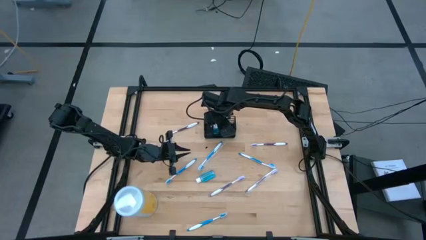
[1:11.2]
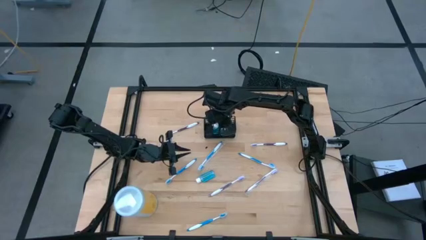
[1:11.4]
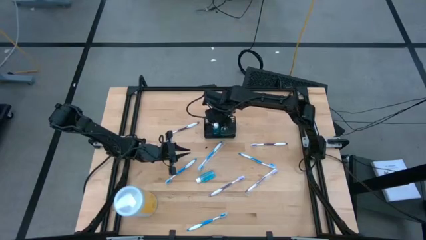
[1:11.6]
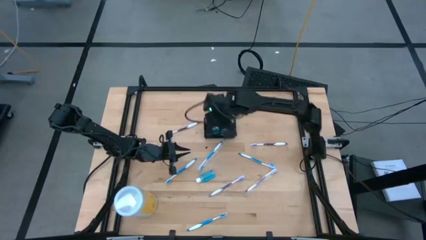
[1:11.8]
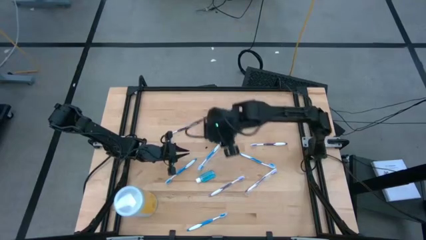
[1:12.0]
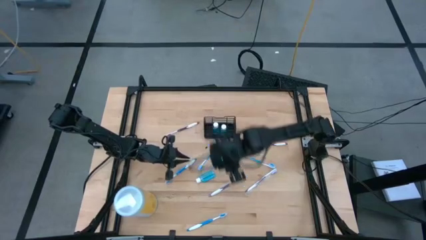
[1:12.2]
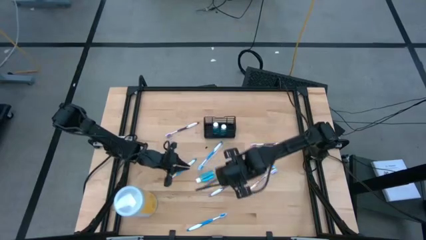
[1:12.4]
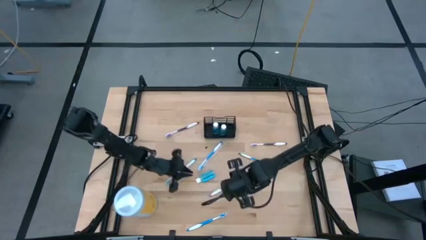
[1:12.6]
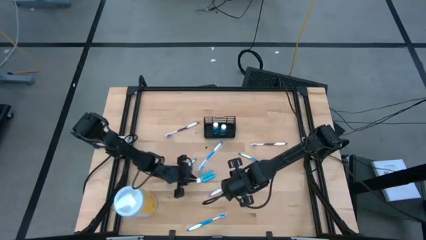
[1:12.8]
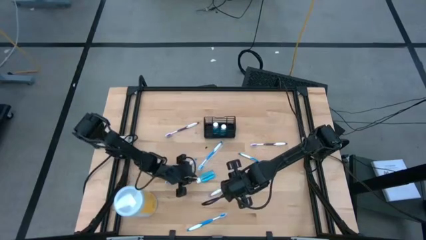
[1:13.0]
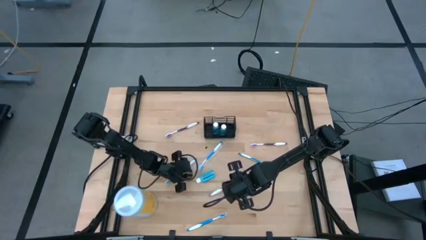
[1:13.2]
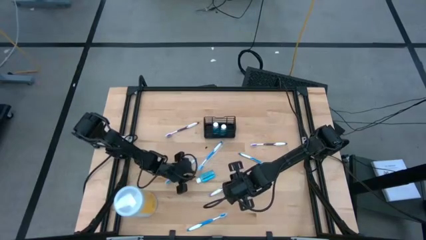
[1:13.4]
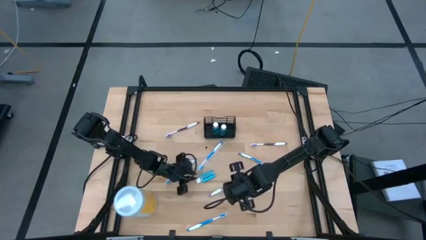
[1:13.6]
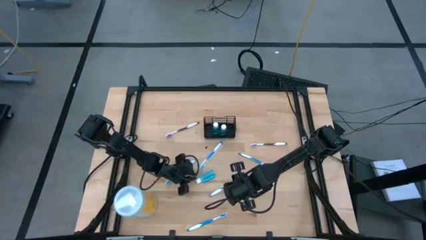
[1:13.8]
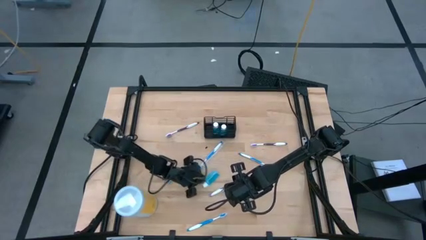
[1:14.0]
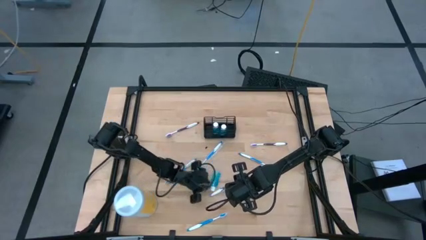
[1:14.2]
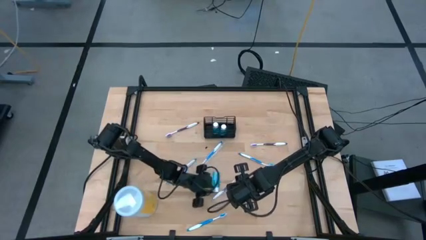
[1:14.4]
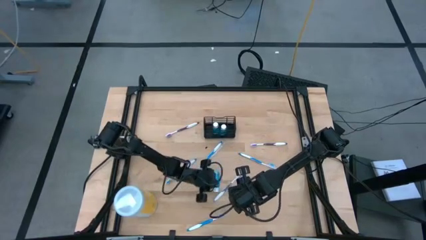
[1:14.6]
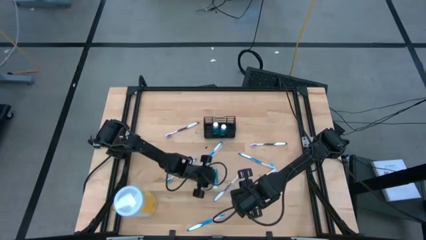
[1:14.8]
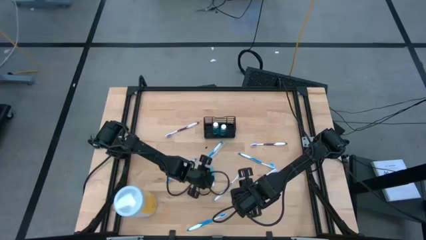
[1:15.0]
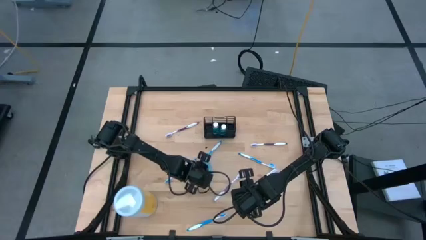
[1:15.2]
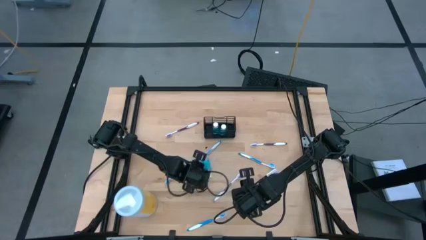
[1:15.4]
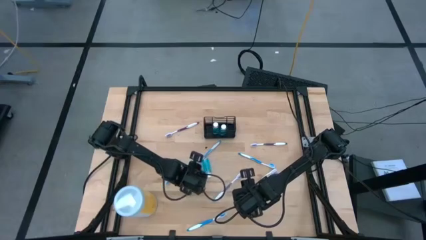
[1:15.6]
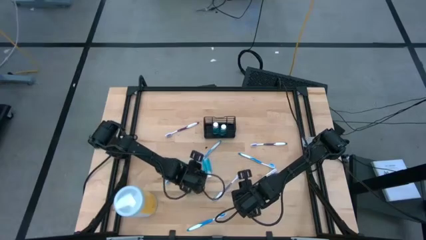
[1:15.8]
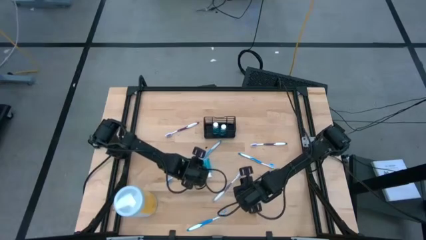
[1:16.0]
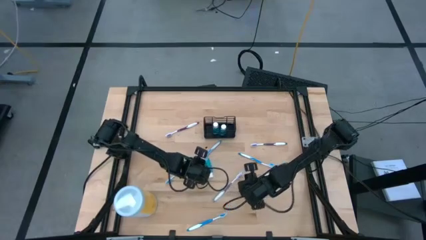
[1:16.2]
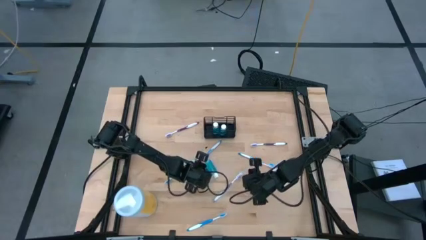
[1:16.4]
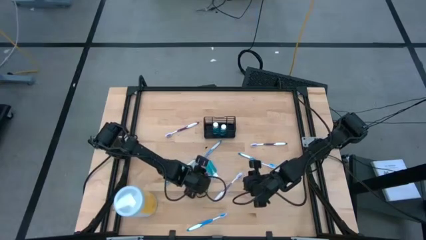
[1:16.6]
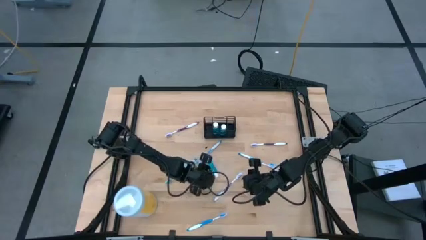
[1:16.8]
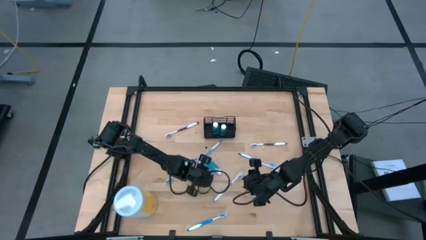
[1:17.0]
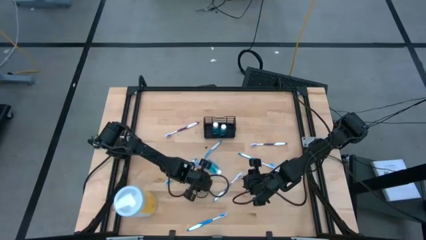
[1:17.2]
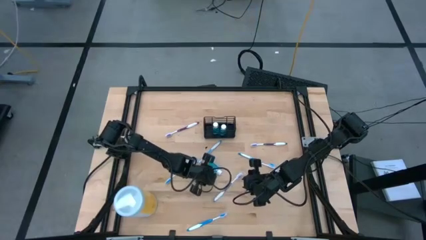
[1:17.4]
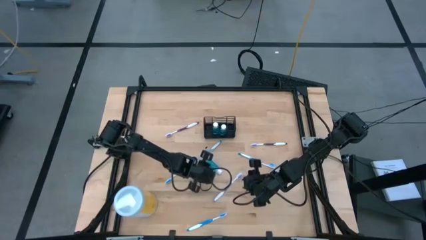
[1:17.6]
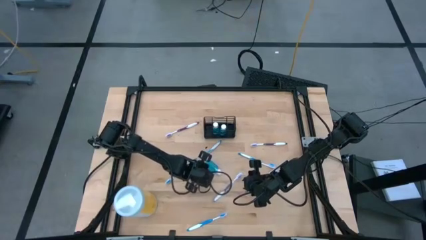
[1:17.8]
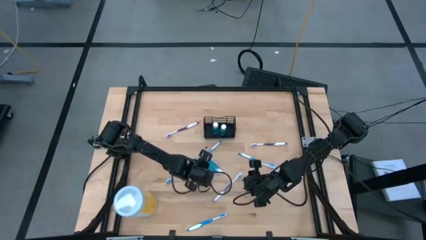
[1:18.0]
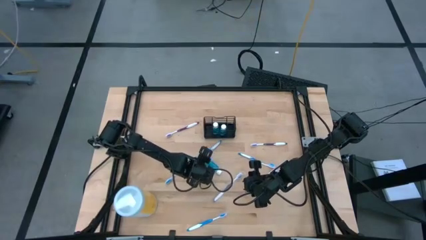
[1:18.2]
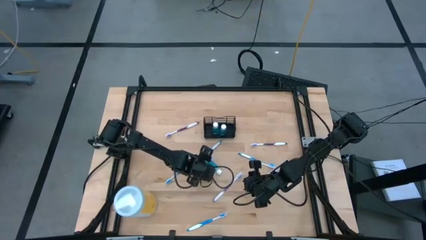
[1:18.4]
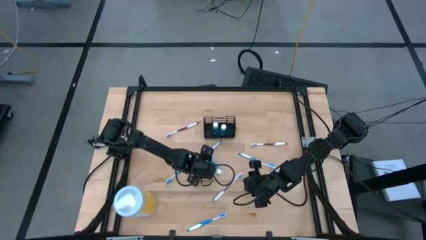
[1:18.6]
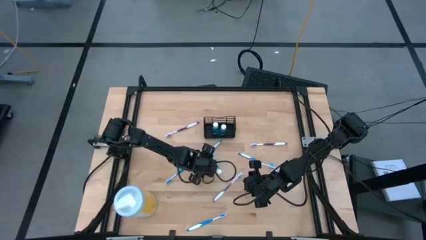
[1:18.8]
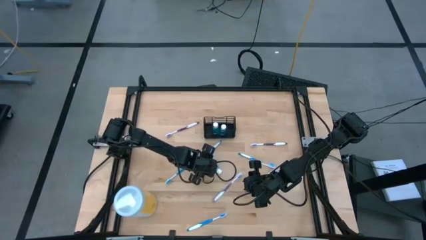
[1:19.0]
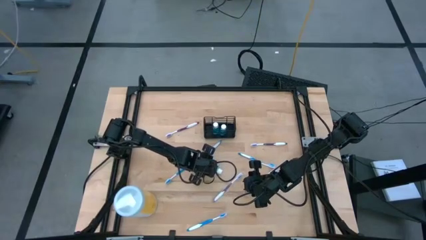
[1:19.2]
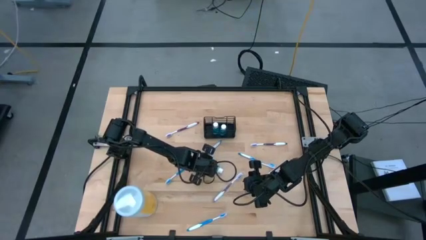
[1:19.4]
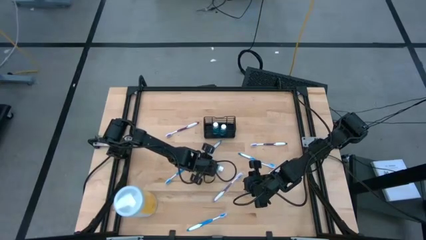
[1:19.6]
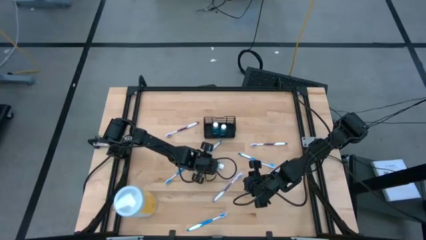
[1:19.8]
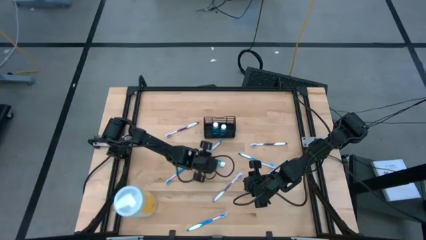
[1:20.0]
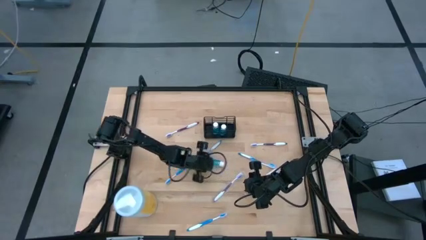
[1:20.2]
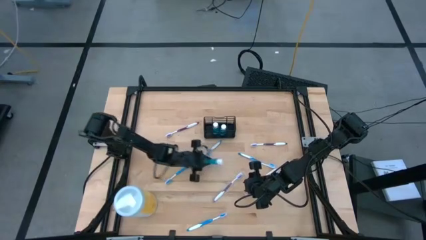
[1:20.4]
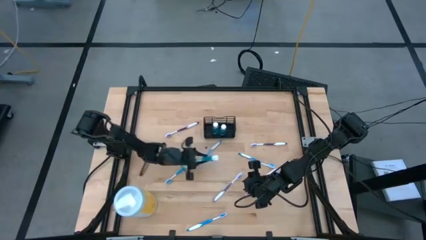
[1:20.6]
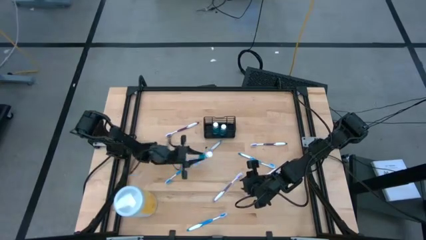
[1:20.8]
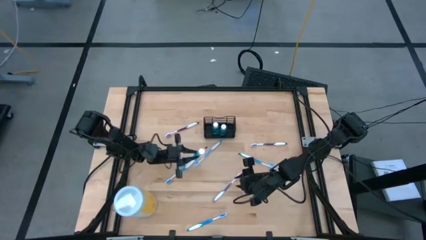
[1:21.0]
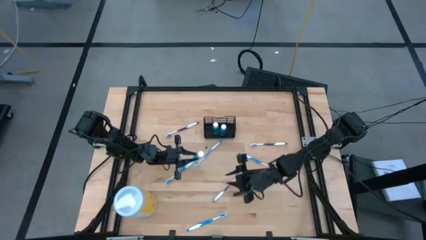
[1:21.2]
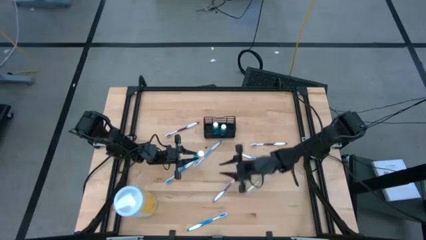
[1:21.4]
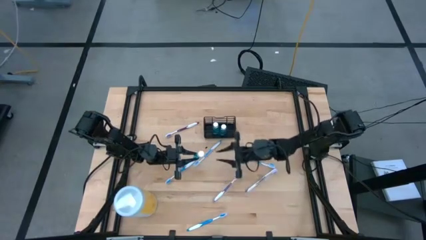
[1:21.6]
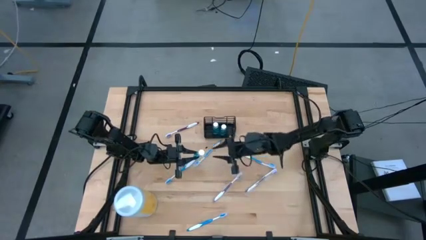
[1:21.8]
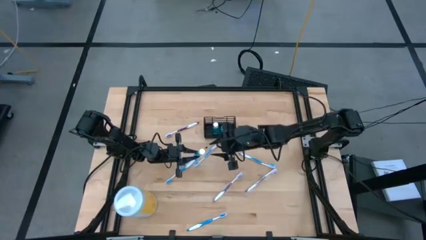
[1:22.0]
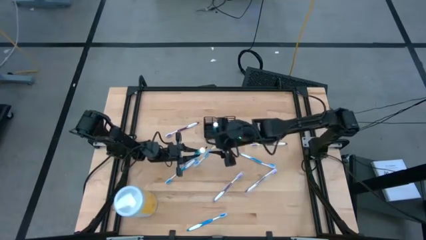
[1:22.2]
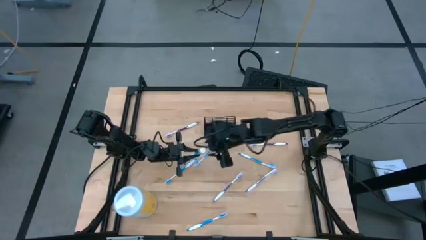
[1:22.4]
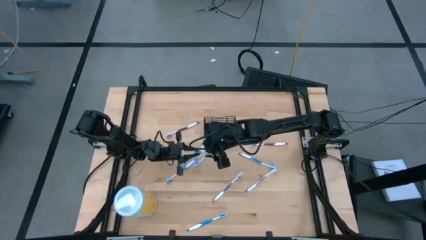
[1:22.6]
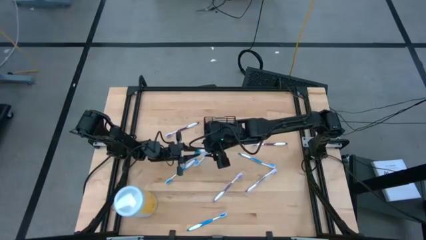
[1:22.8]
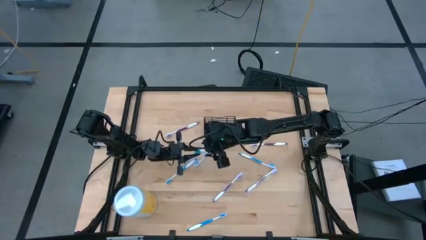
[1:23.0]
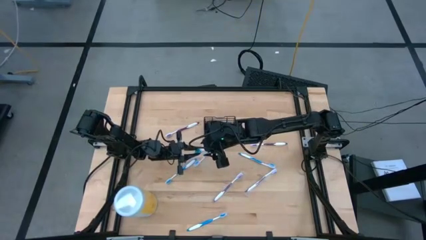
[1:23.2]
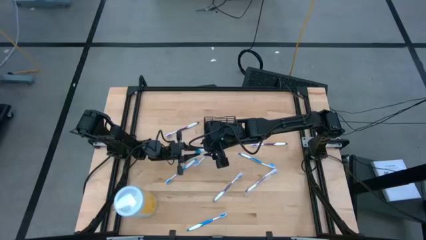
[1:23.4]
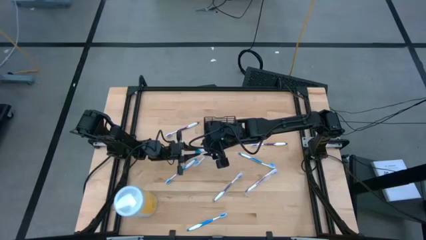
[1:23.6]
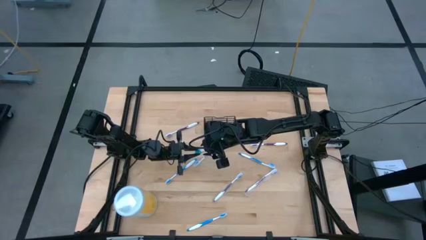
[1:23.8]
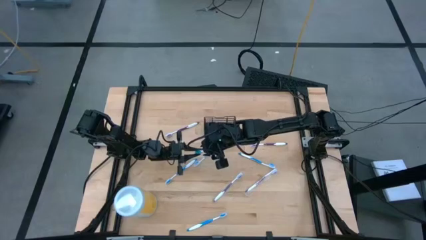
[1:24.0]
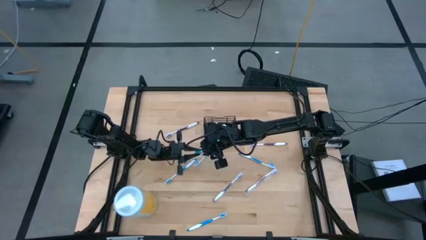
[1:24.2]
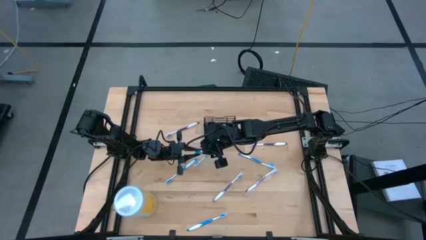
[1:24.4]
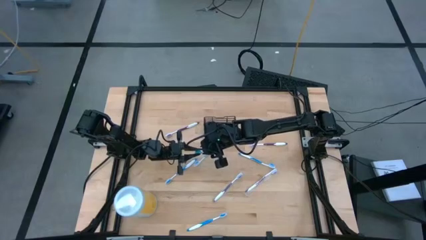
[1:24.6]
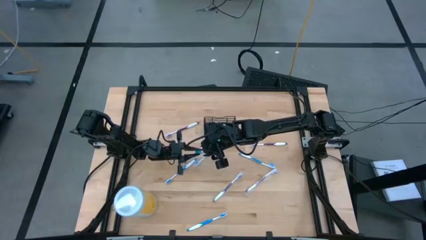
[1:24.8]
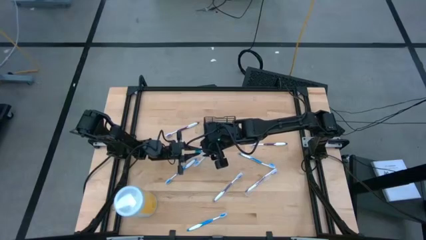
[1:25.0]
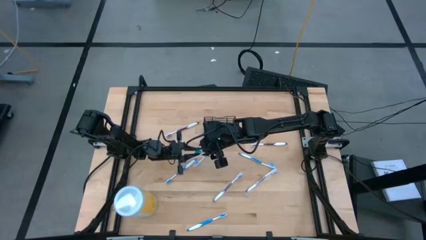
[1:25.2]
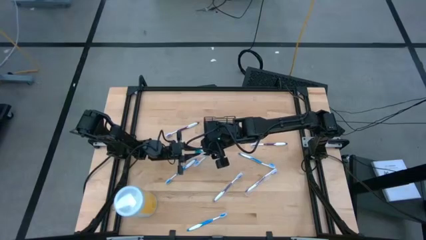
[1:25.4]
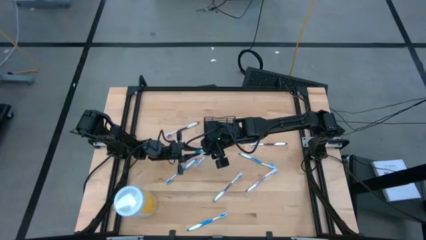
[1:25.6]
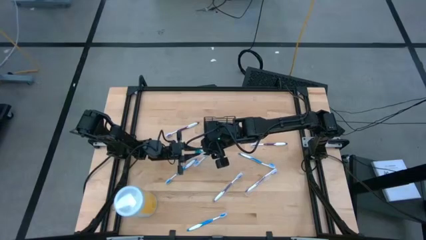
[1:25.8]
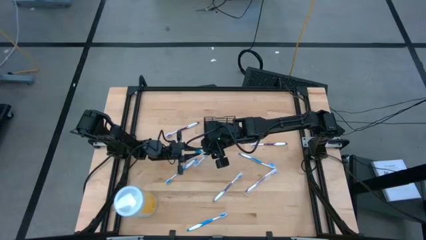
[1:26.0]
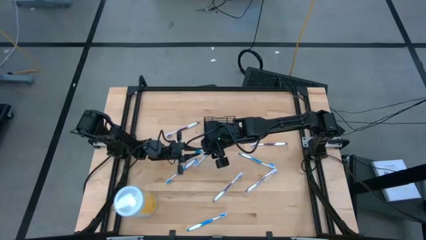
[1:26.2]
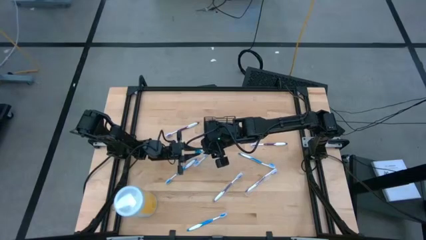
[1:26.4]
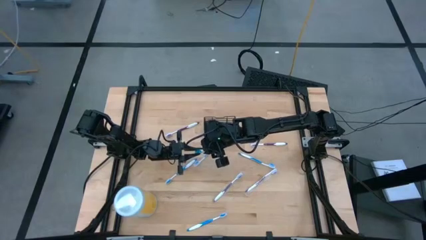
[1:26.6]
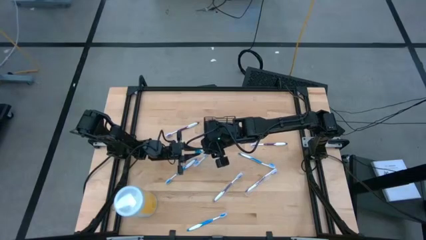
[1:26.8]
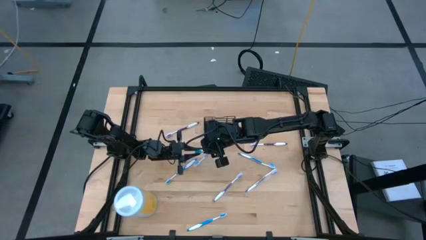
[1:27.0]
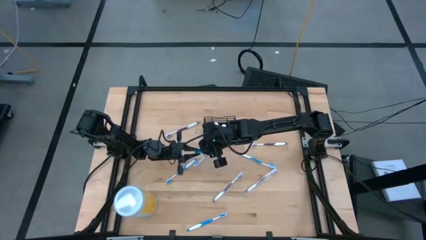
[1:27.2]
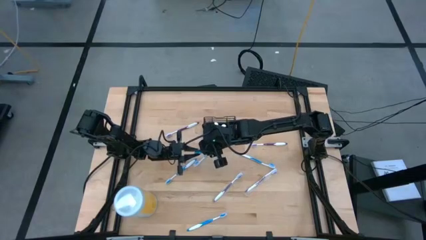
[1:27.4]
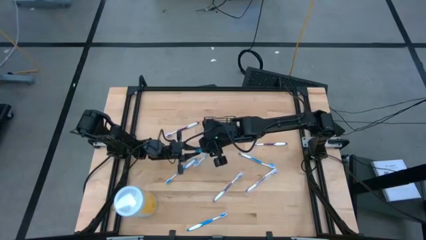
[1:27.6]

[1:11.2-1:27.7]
Task: Pick & Place toothbrushing station
Put the blue mouthwash bottle into the black organizer
